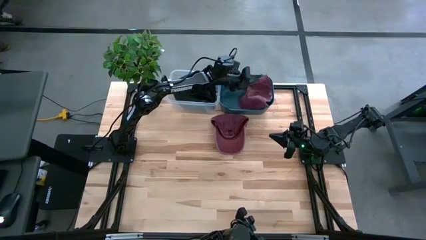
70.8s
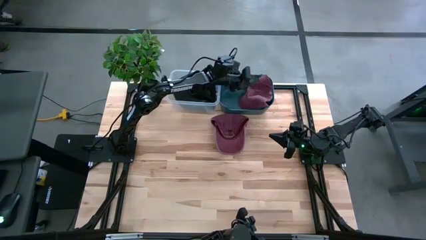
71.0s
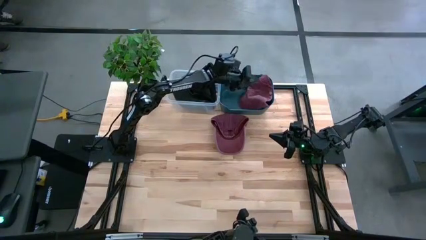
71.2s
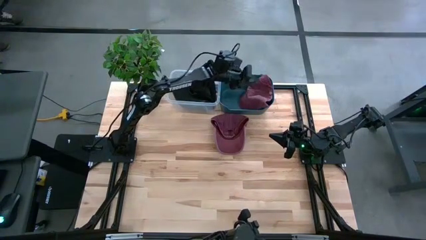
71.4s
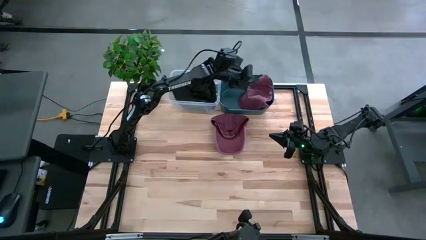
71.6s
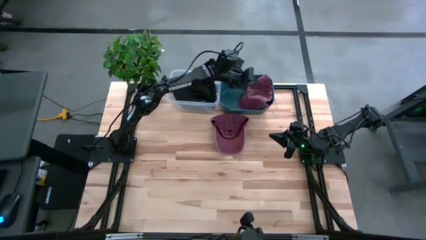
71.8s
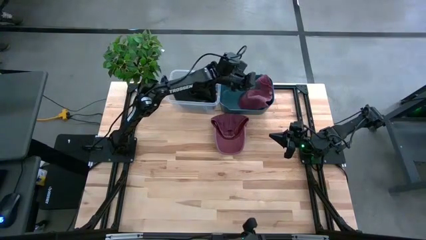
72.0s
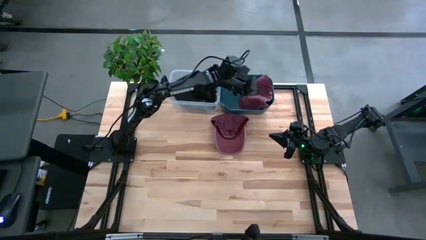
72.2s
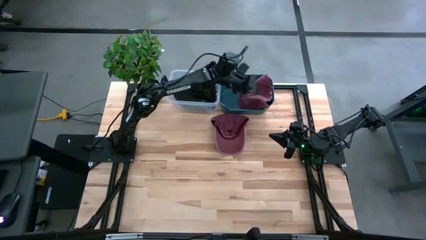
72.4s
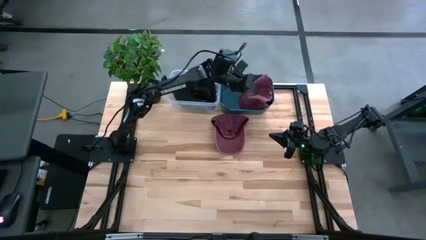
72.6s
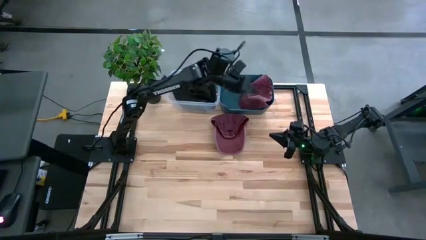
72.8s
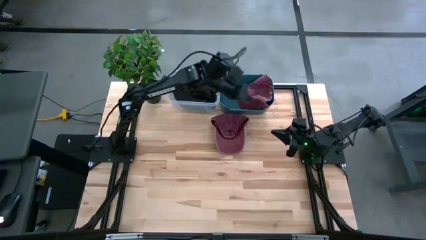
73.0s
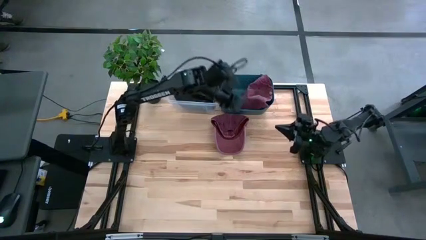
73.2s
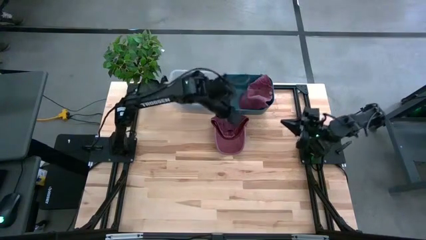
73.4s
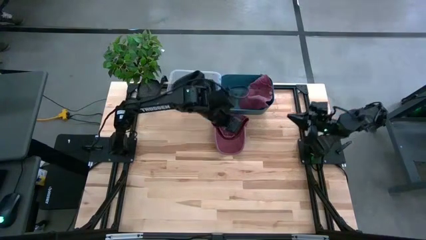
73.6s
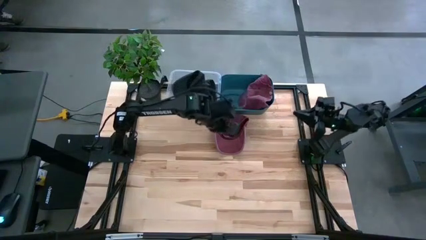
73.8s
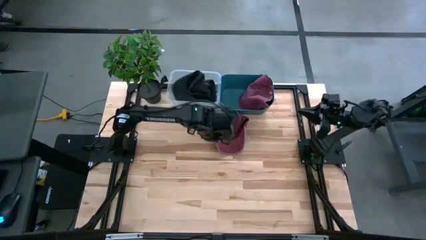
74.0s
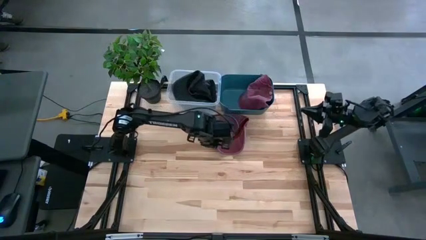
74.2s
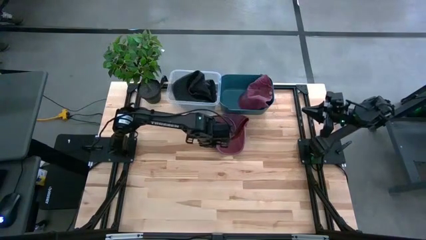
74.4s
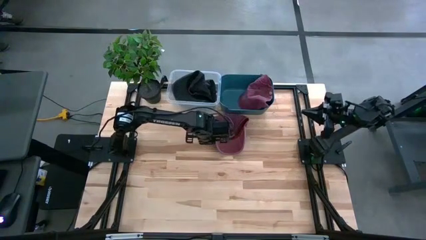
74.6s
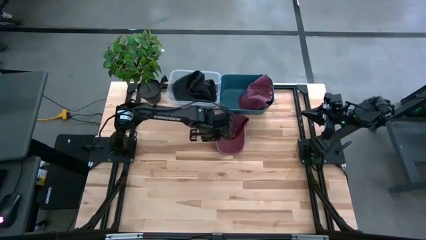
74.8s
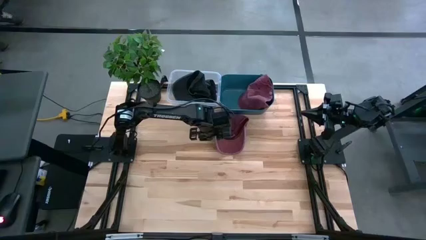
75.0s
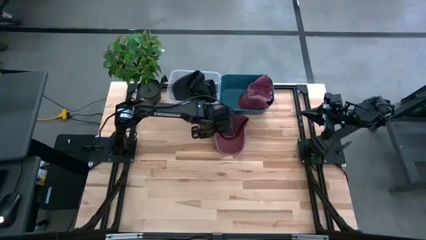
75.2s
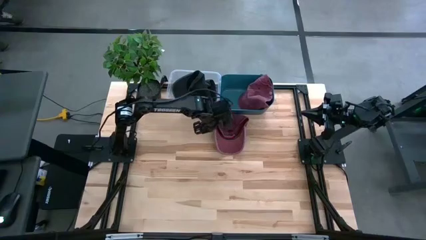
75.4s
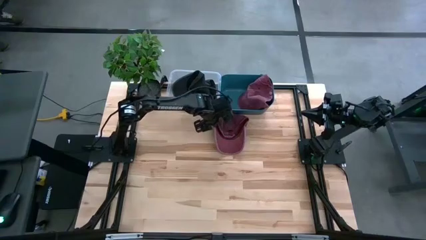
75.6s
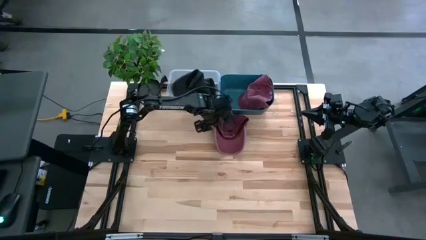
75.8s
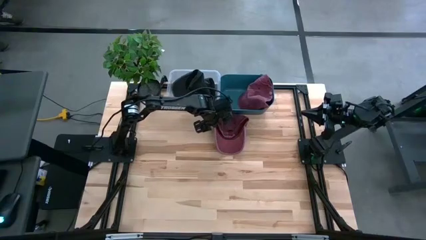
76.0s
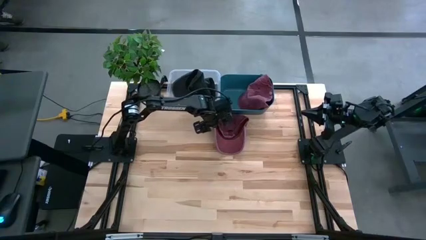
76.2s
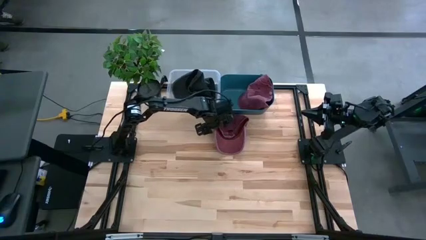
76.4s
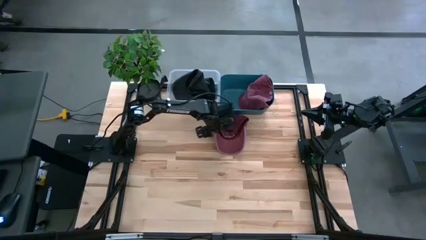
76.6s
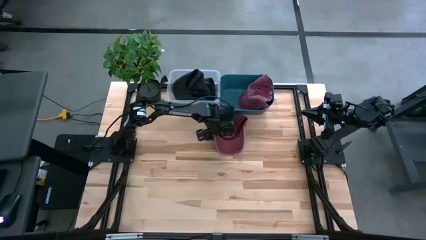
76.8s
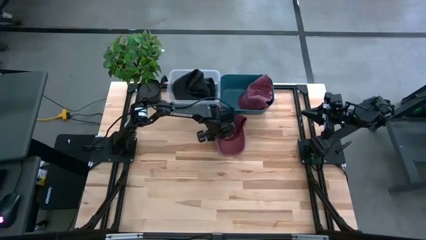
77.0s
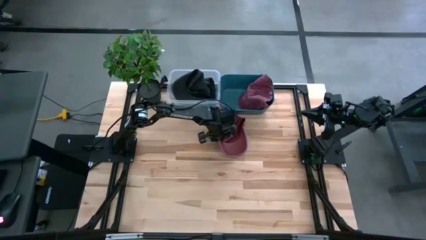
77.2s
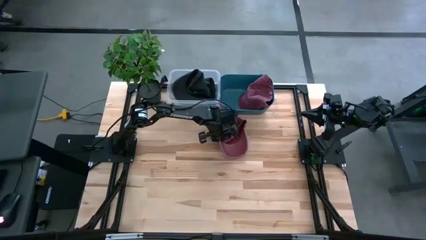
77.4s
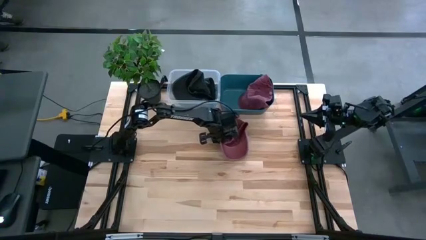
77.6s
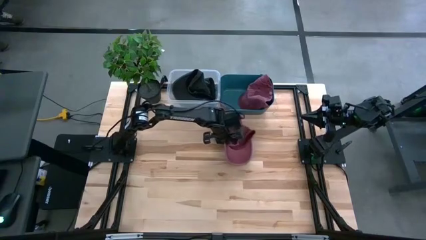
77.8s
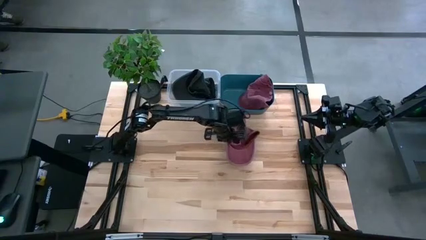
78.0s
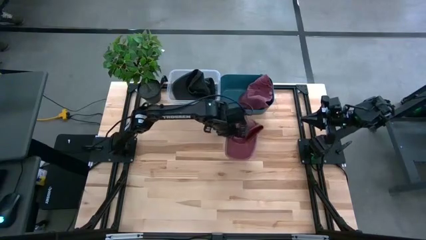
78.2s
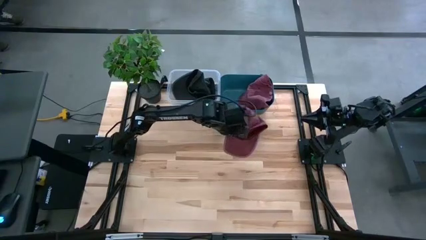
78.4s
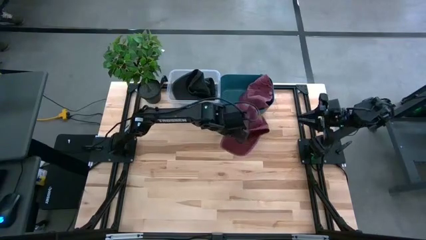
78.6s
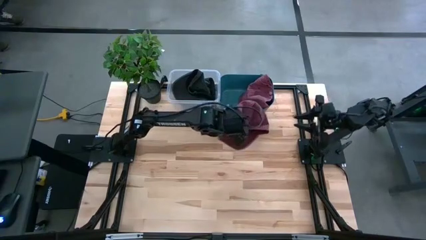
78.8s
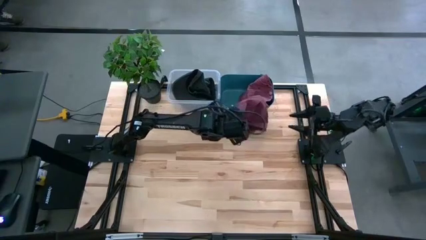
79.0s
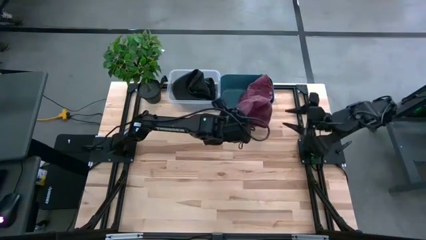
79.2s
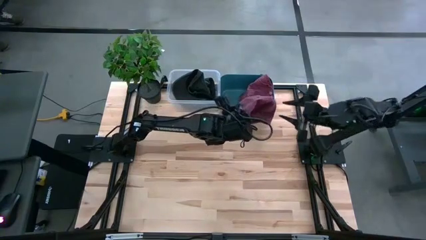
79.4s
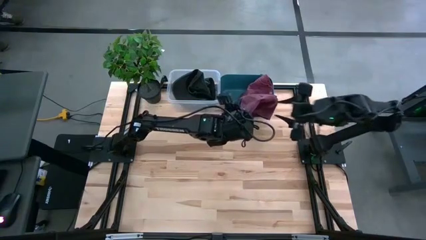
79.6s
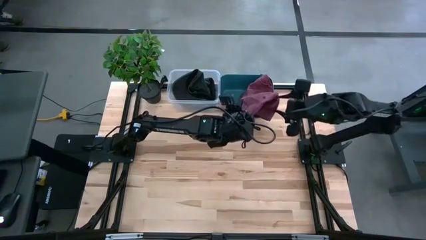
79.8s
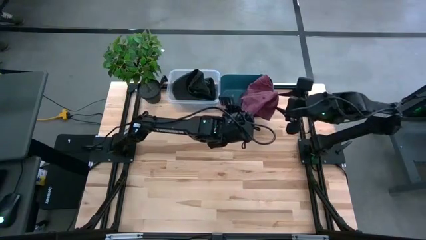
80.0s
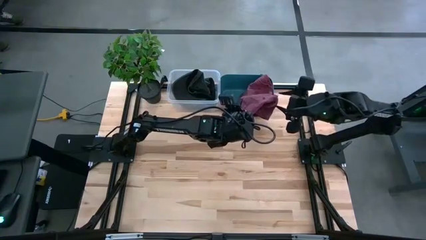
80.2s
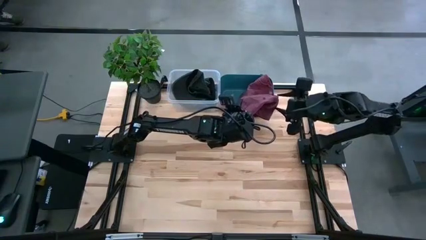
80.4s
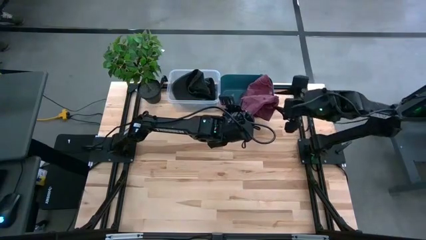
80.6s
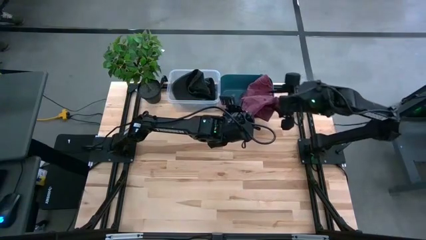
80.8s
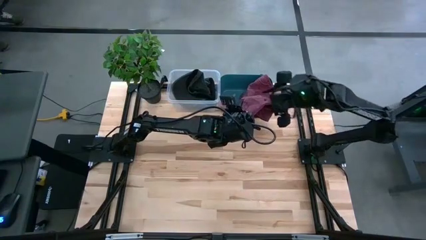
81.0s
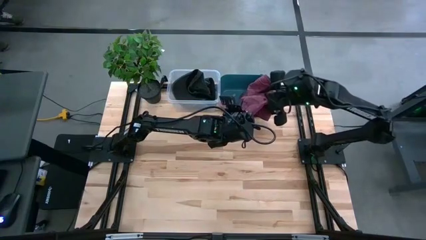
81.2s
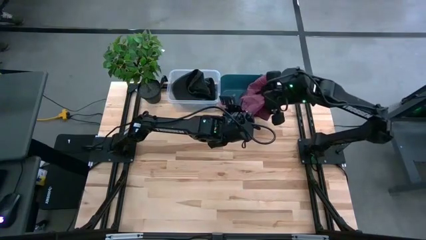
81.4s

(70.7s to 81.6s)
Task: Pick & Place hat
Put the red cap into the blue bin

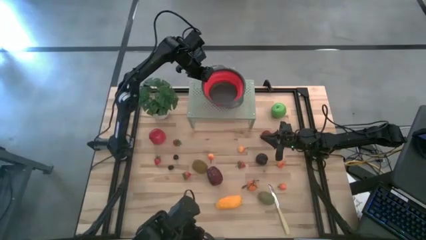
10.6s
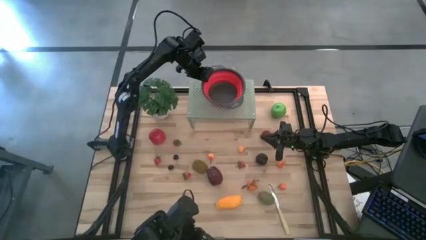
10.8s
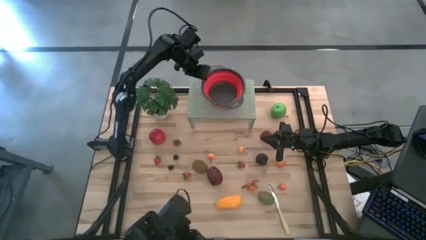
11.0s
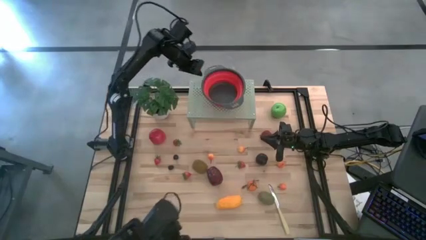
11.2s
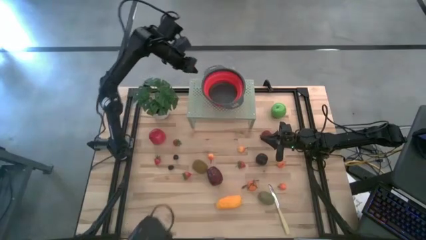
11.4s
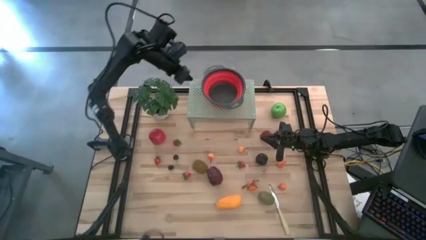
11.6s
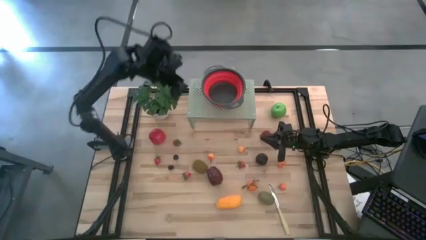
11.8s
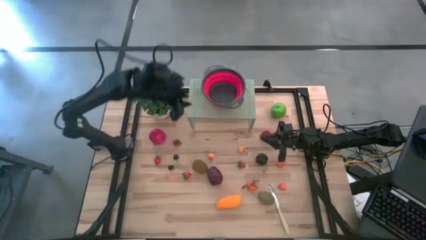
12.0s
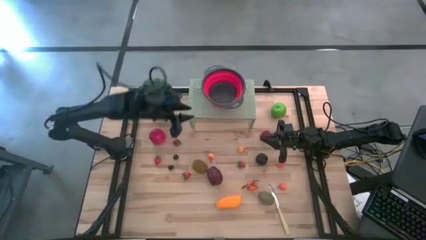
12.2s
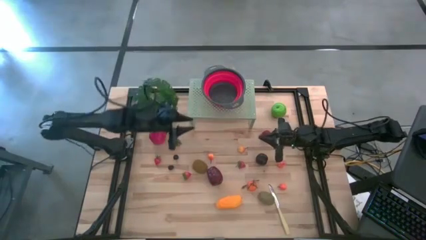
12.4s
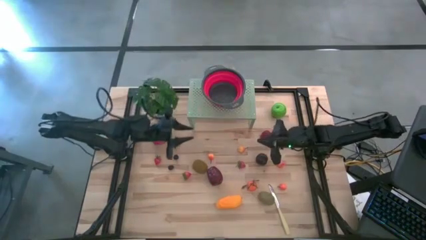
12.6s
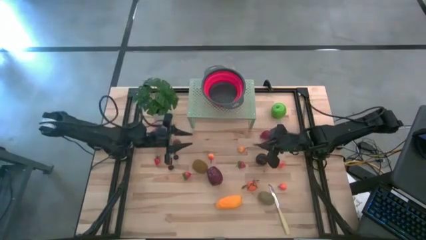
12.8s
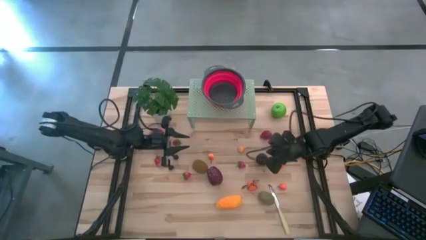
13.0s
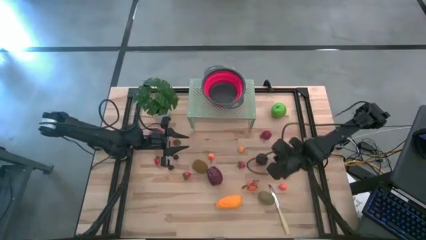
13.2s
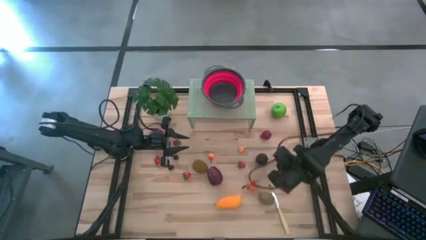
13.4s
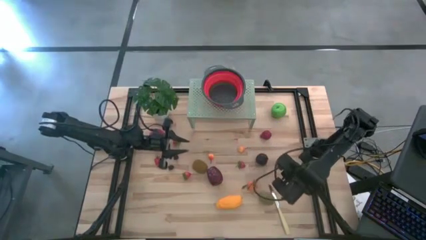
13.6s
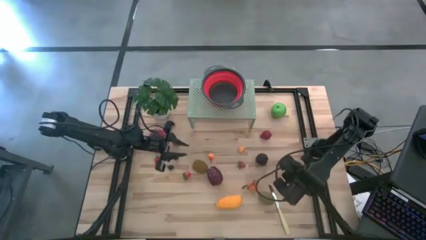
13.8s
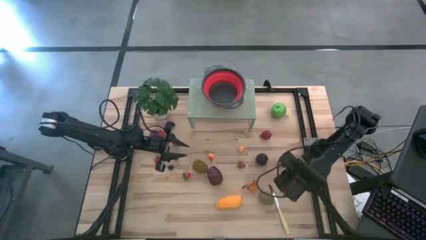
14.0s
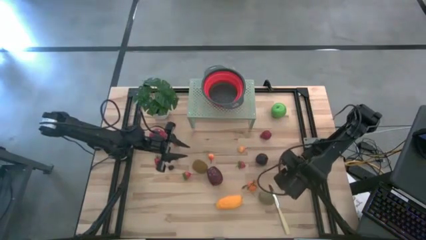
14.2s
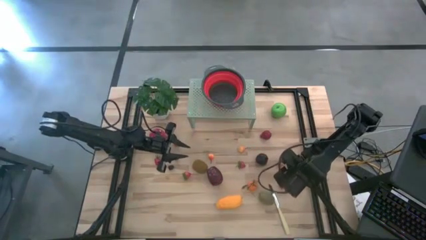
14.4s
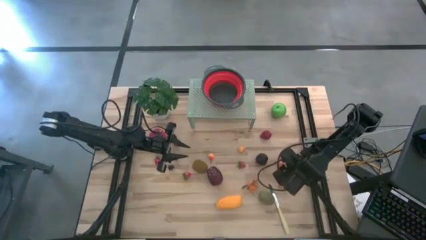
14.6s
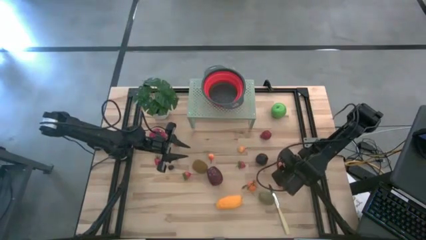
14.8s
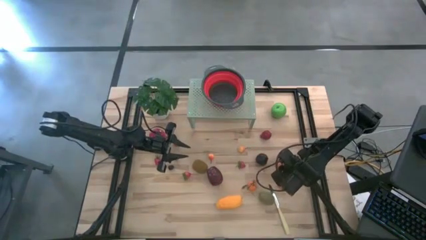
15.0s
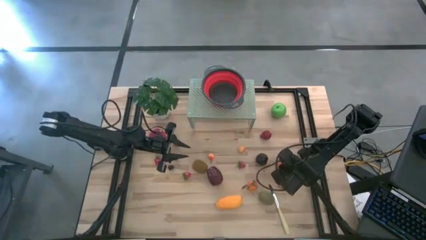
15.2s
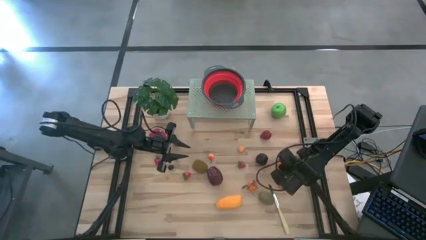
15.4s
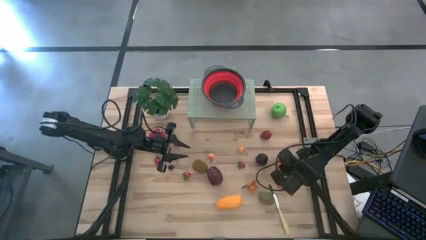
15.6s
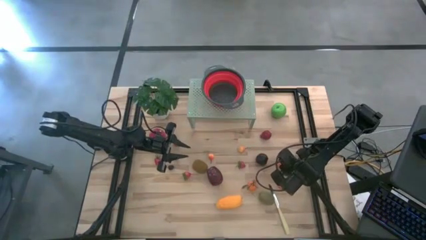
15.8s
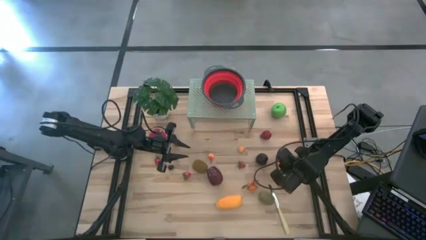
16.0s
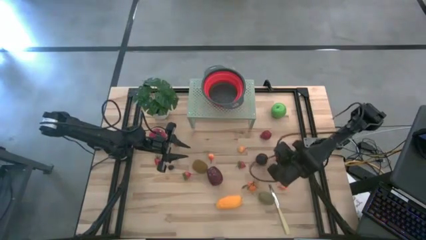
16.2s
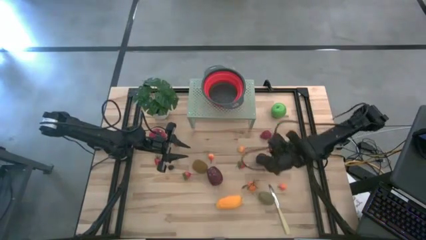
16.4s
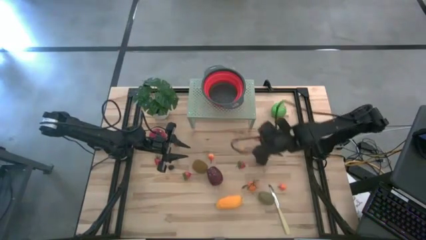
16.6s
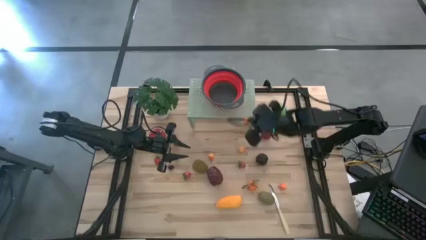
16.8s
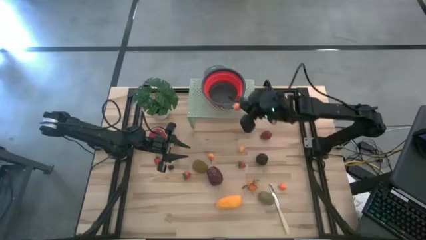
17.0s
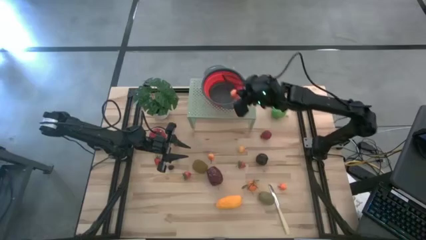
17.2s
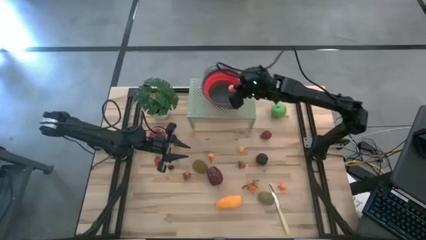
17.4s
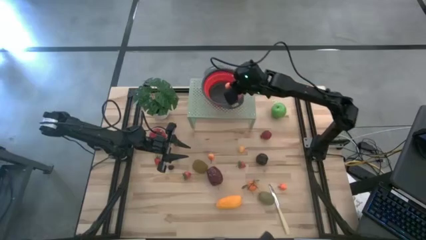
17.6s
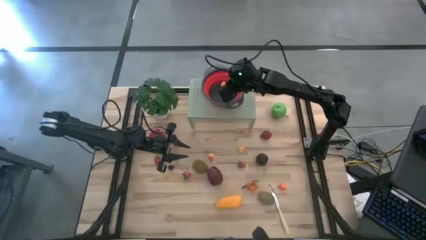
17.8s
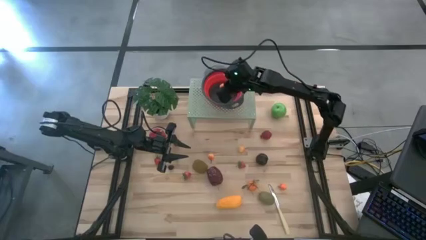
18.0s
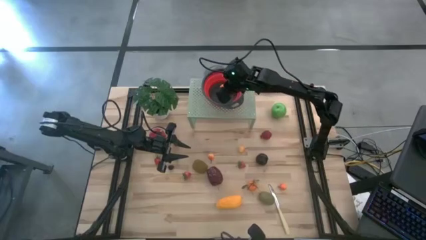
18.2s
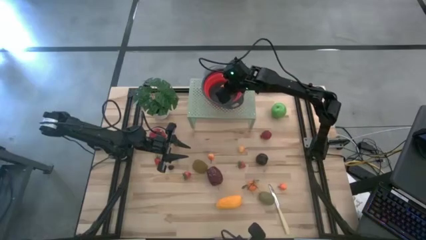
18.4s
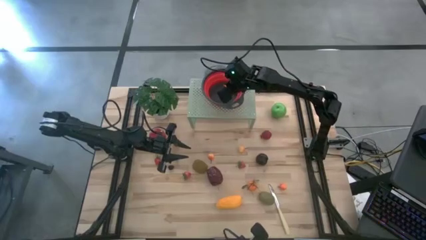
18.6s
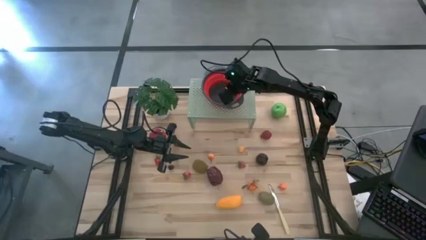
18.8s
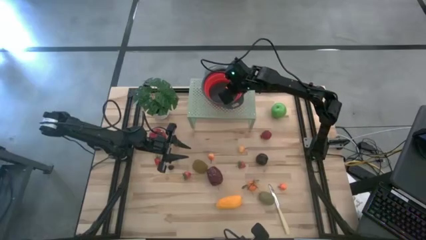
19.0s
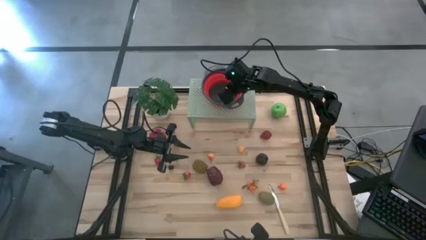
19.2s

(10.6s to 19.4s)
Task: Pick & Place Fruit
Put the peach into the red strainer bowl on the shelf
